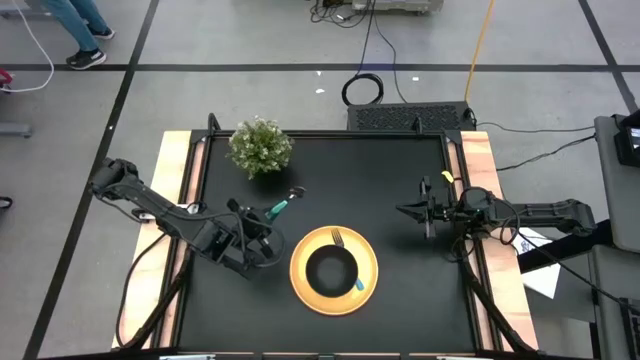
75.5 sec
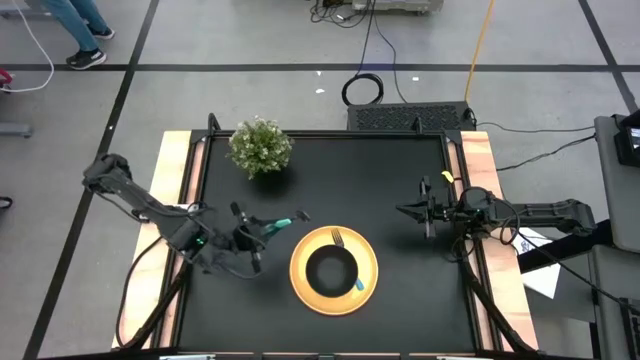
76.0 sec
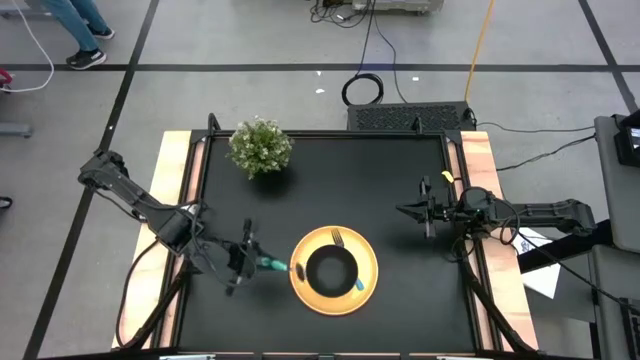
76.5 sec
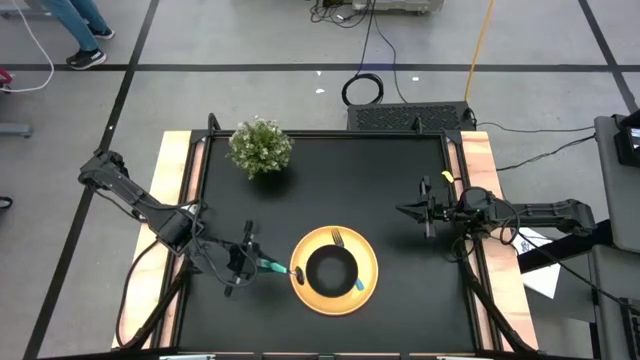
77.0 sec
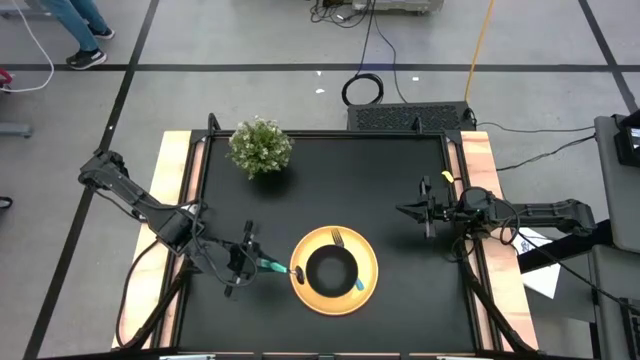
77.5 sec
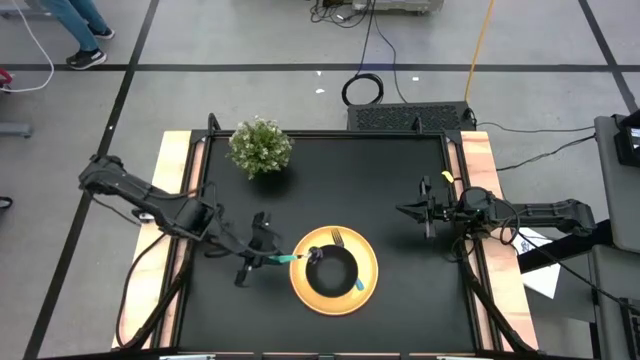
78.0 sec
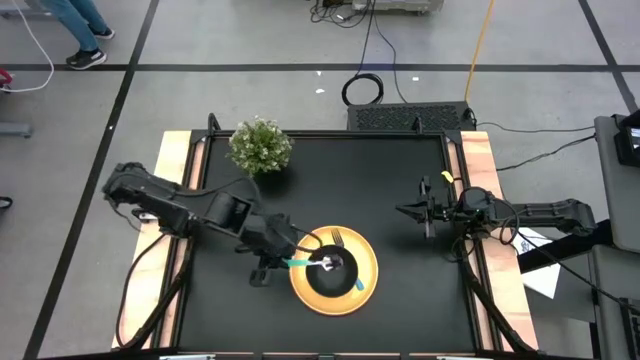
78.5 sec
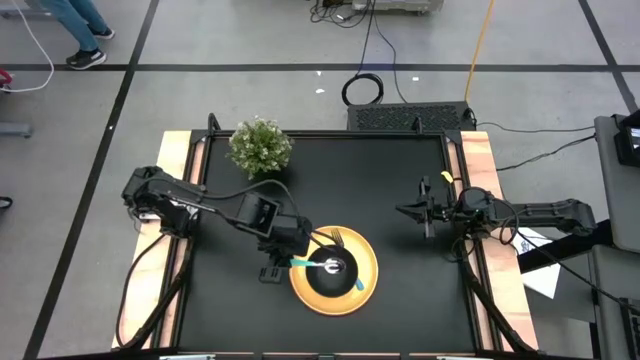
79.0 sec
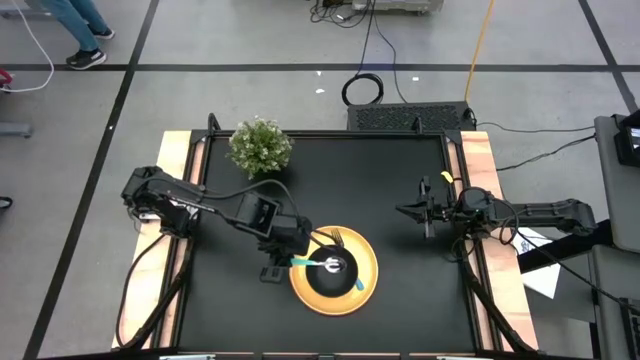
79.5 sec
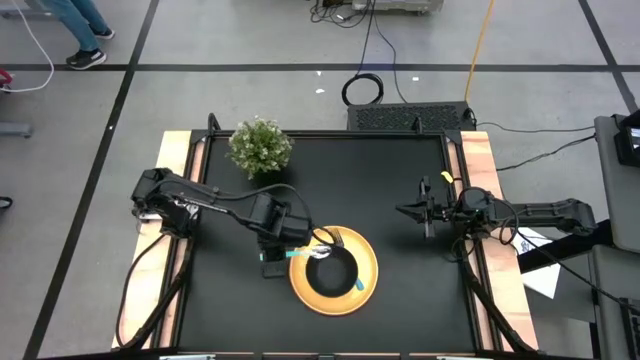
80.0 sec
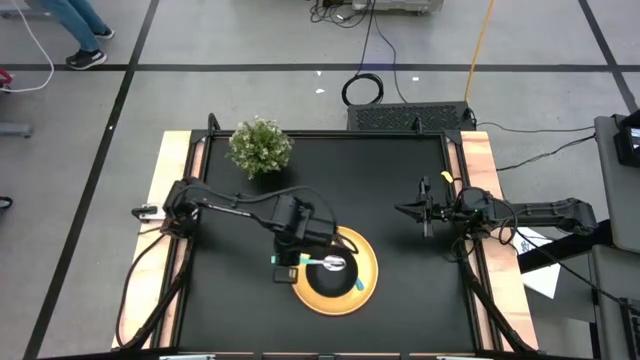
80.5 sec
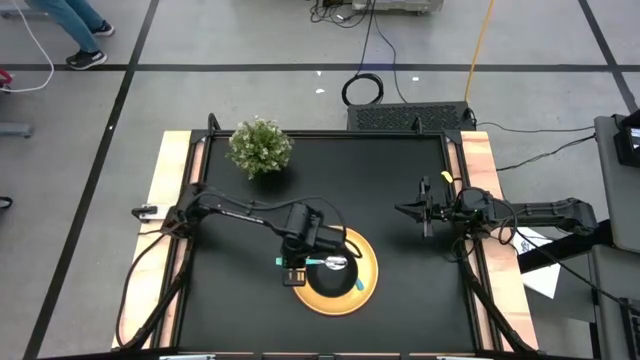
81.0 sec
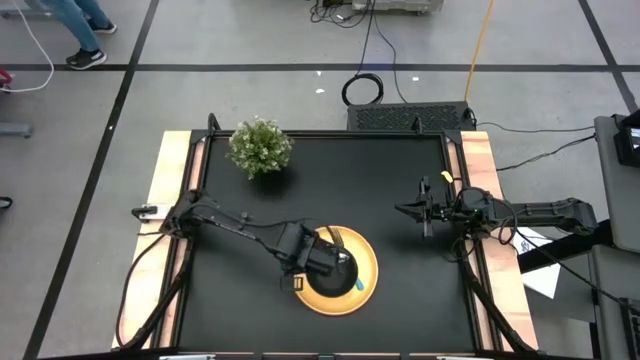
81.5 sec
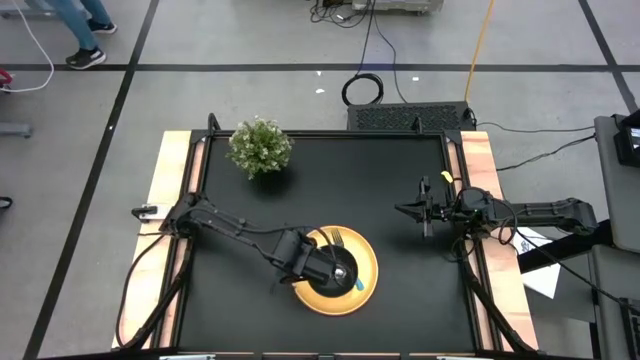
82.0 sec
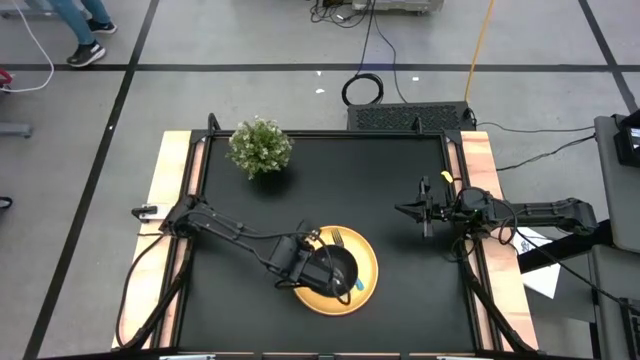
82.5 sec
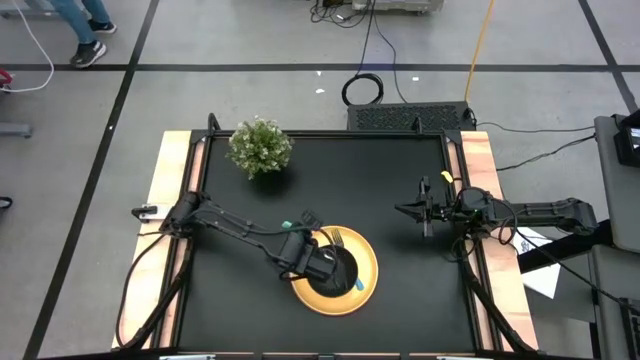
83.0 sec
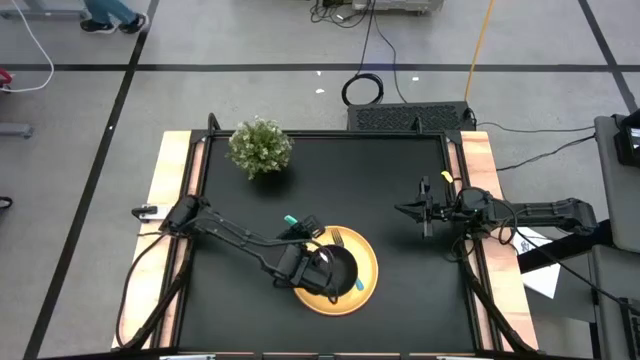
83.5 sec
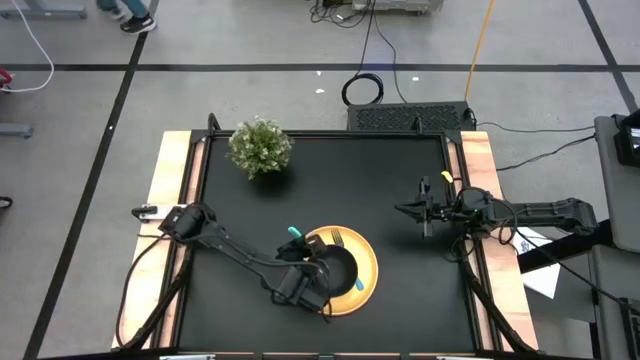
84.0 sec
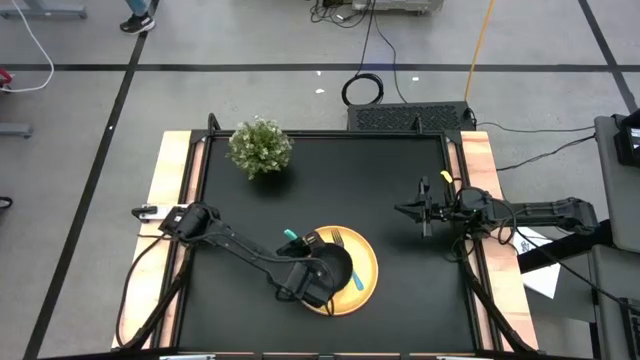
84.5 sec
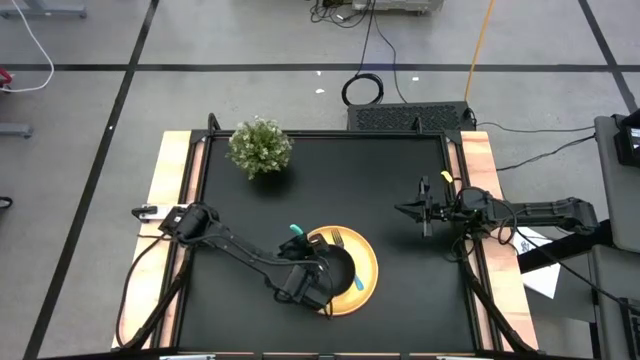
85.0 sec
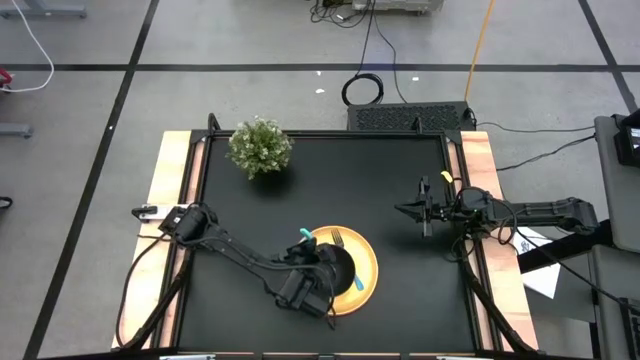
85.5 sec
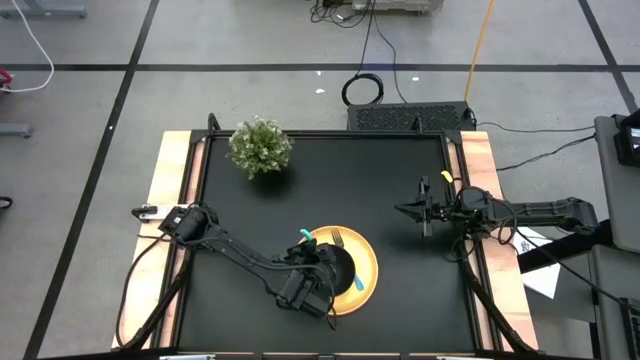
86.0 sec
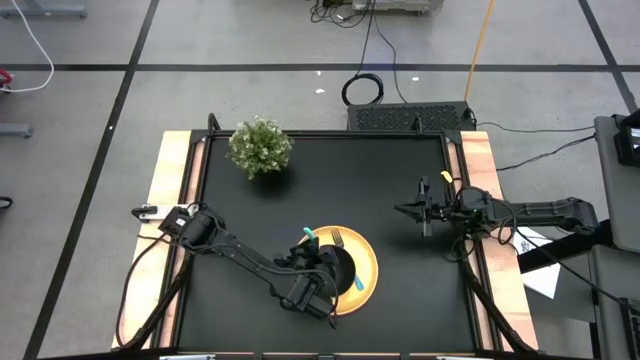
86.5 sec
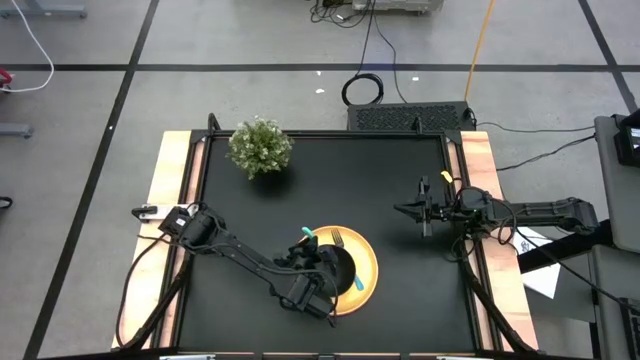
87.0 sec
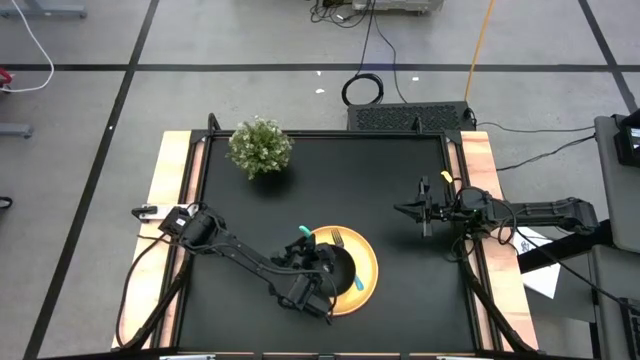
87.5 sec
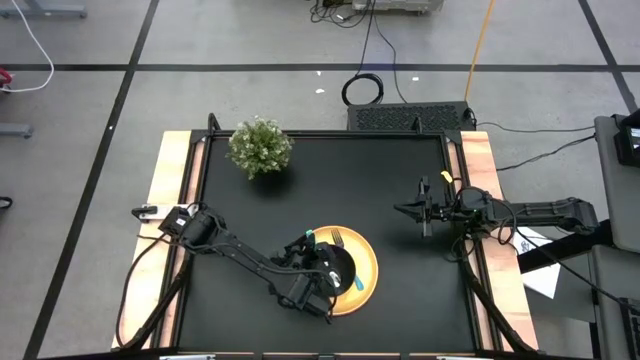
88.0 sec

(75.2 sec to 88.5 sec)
Task: Set table place
Put the blue spoon in the black bowl on the yellow plate

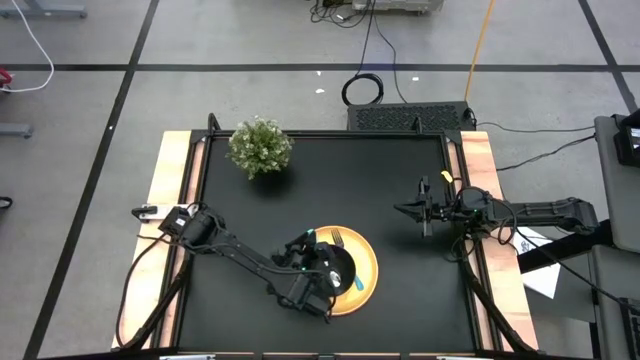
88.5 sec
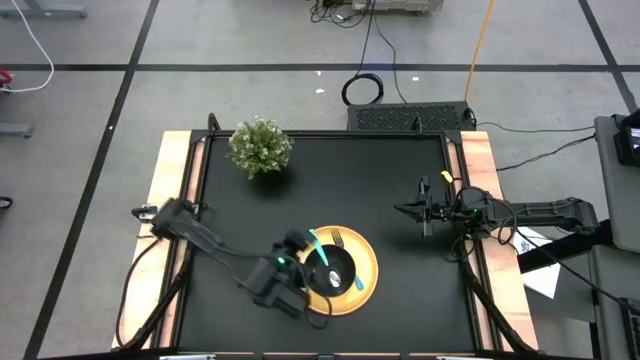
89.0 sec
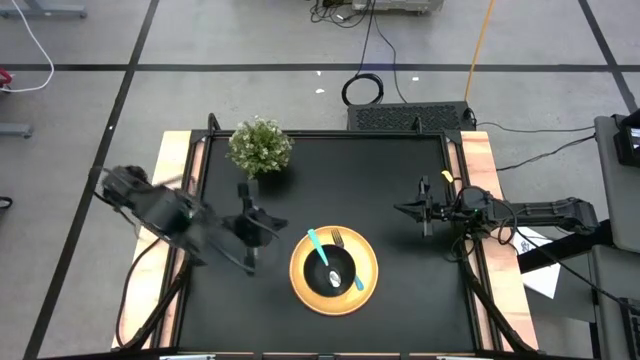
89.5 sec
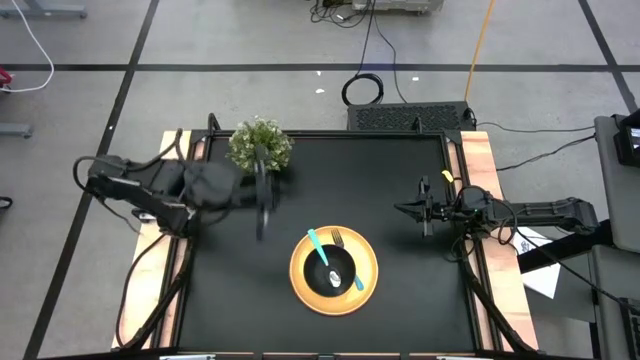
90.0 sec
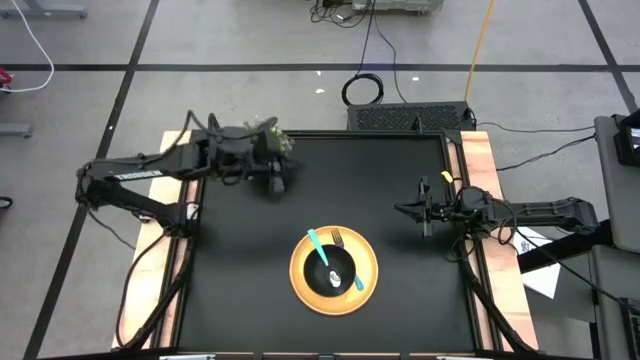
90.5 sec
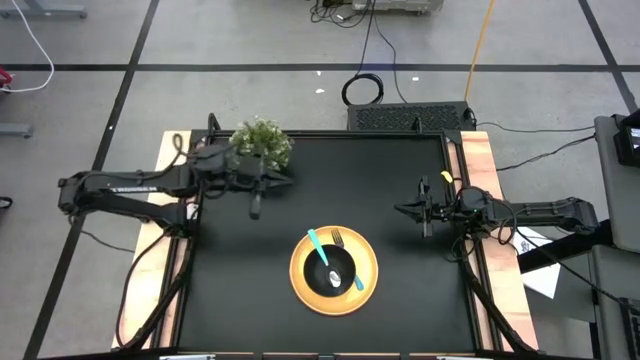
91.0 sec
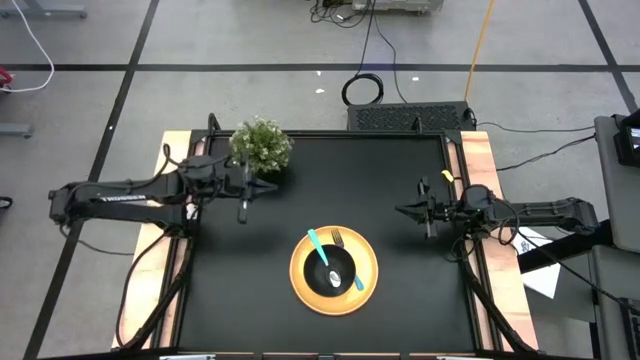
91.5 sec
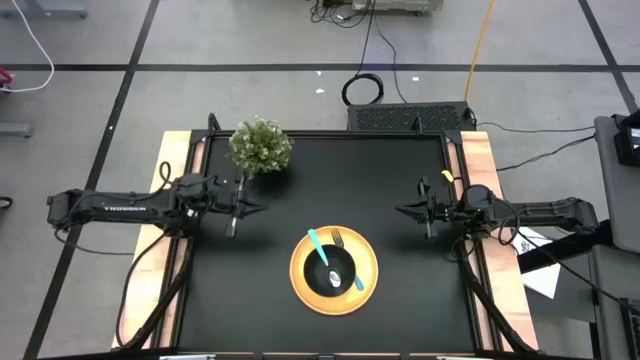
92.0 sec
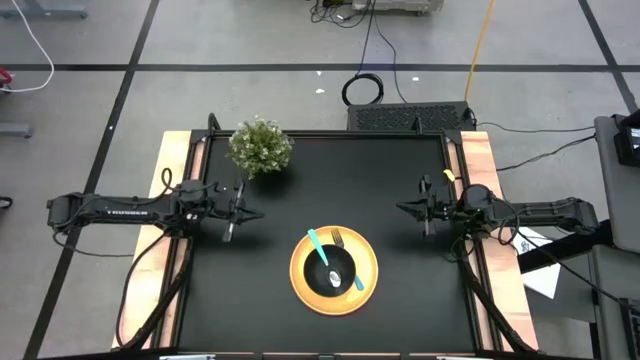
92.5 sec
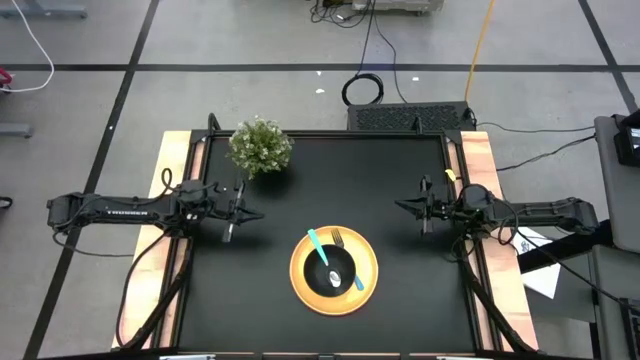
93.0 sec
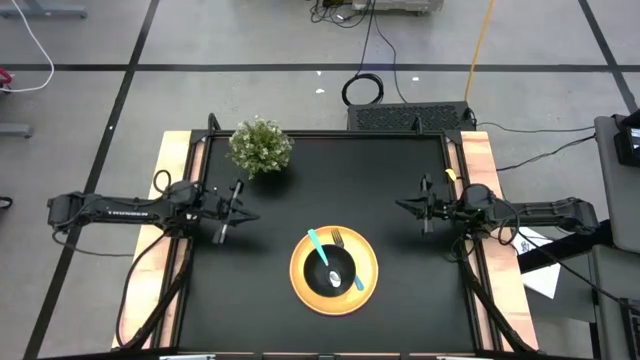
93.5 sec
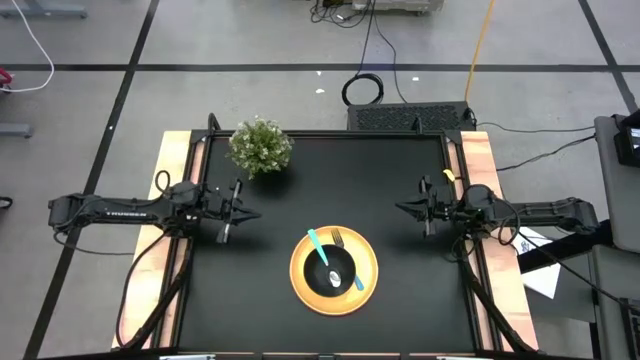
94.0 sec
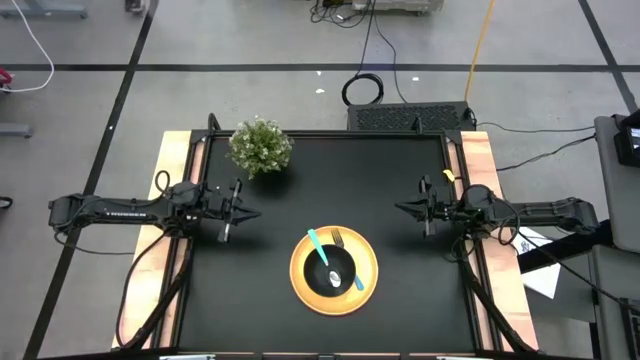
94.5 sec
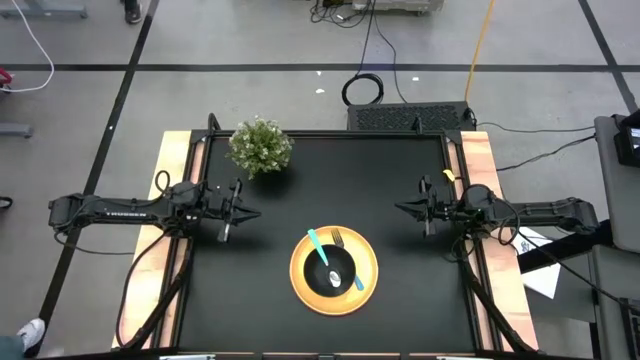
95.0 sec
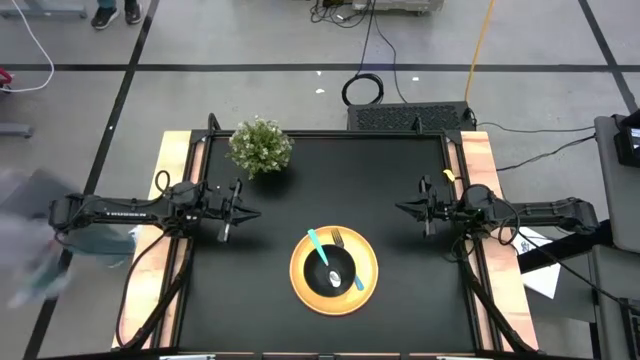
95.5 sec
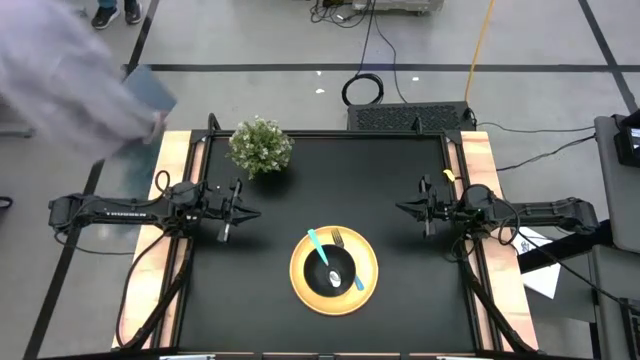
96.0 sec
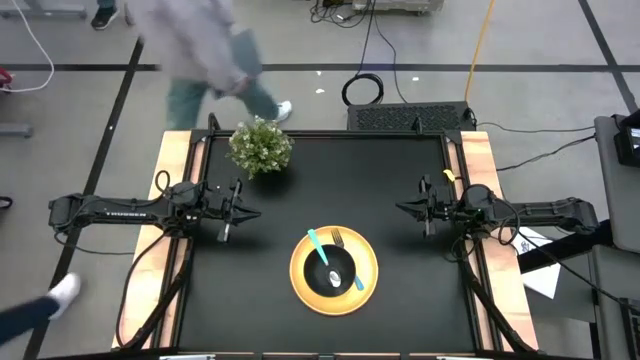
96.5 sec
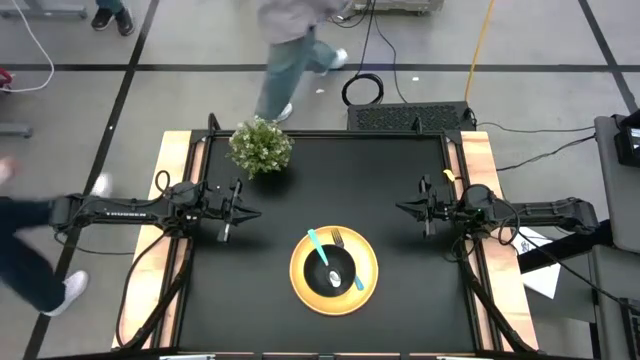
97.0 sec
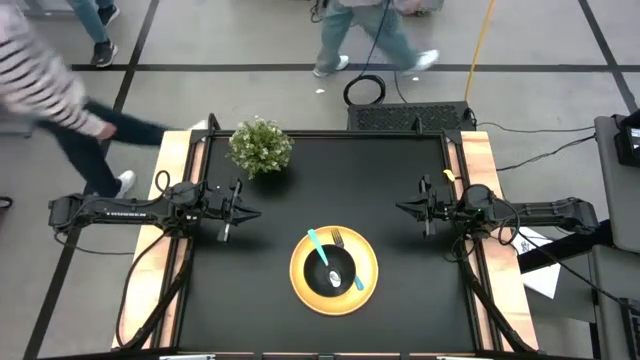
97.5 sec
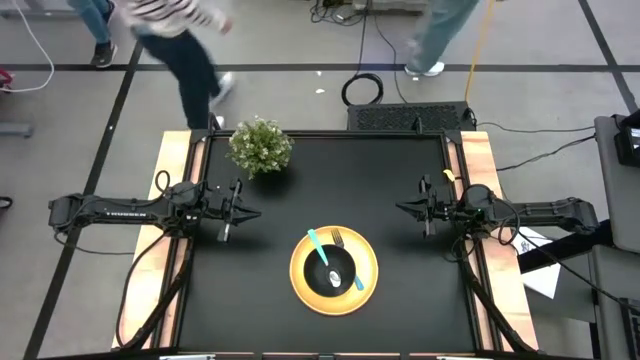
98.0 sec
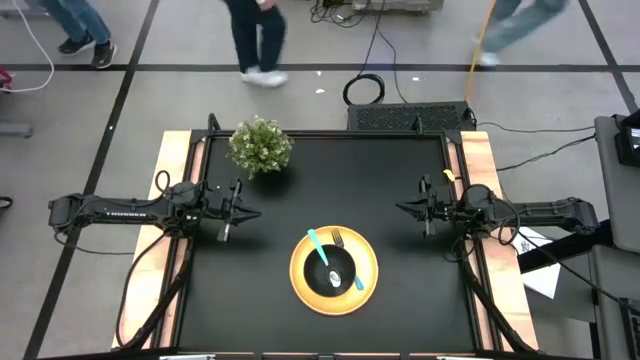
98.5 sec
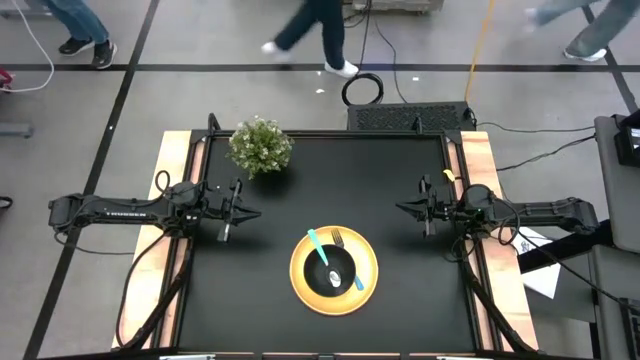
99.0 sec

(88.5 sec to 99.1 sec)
Return to Home Position
